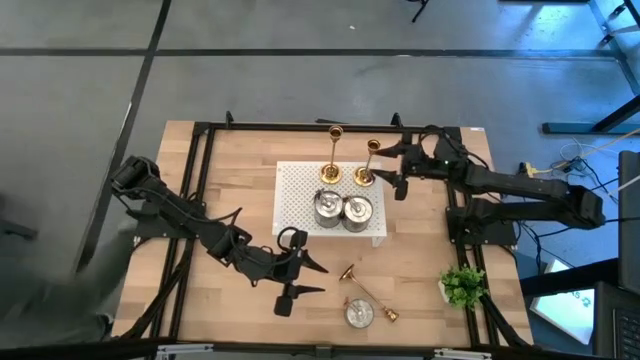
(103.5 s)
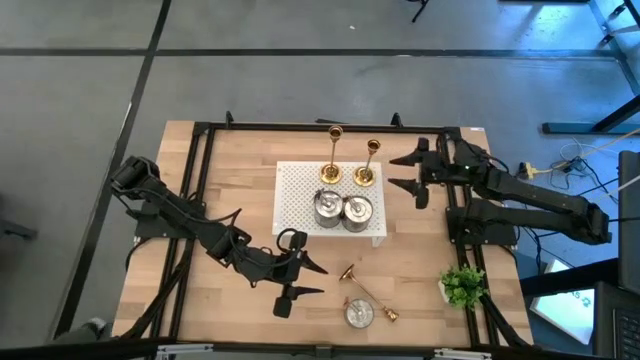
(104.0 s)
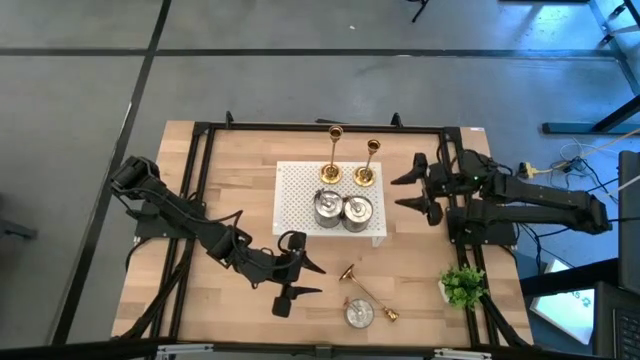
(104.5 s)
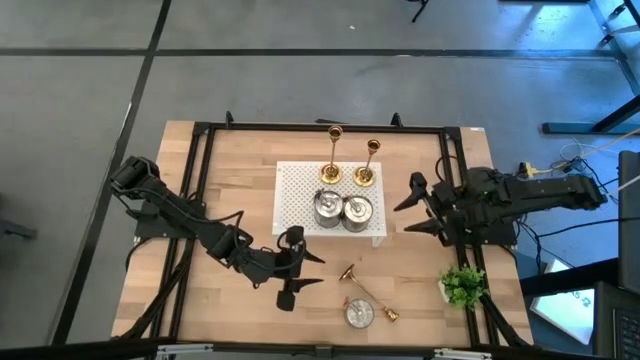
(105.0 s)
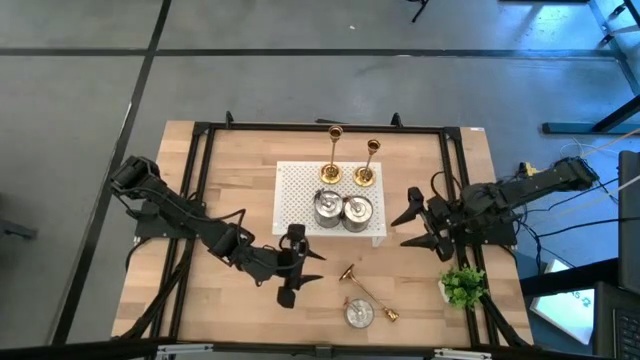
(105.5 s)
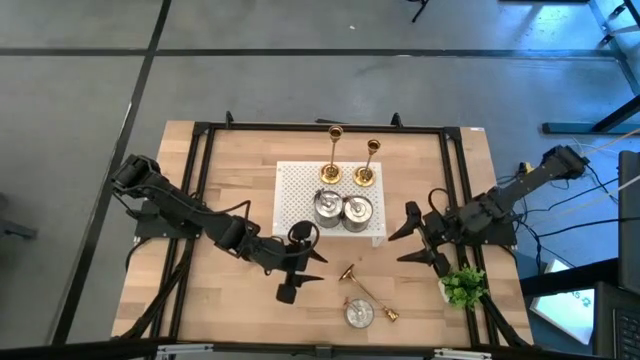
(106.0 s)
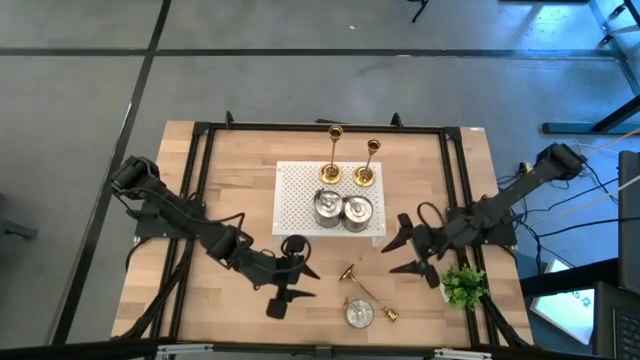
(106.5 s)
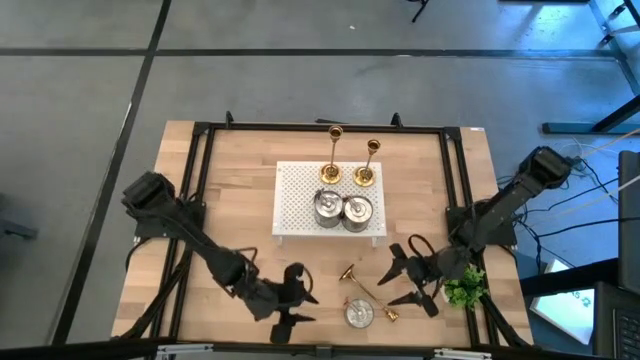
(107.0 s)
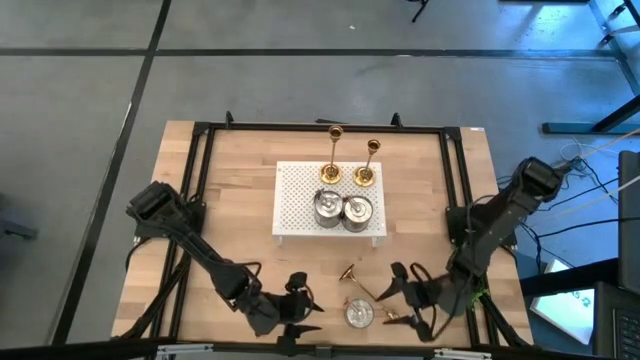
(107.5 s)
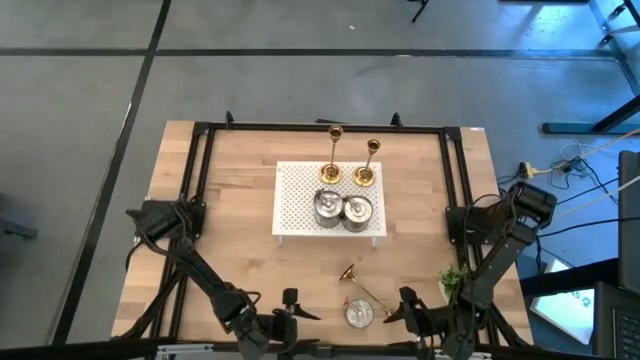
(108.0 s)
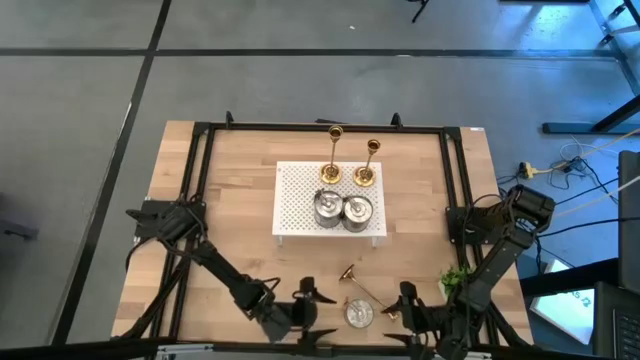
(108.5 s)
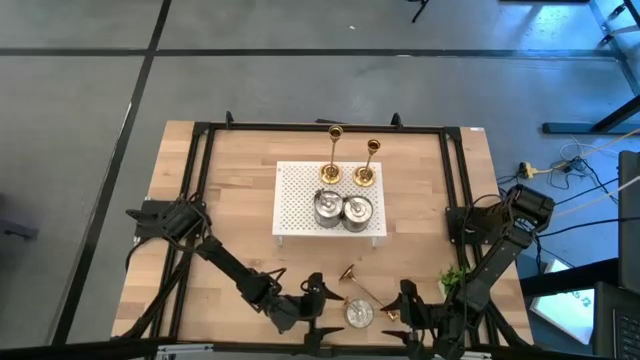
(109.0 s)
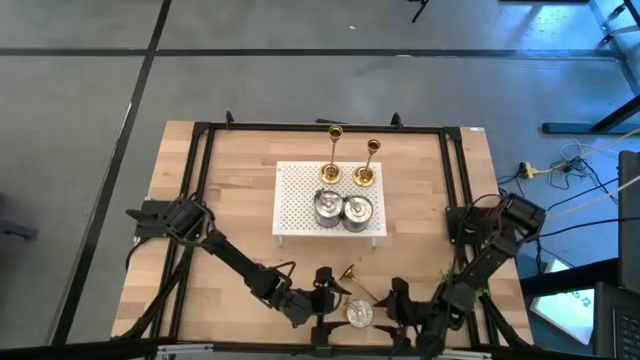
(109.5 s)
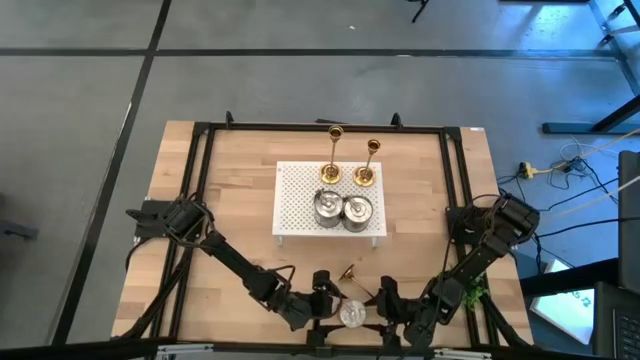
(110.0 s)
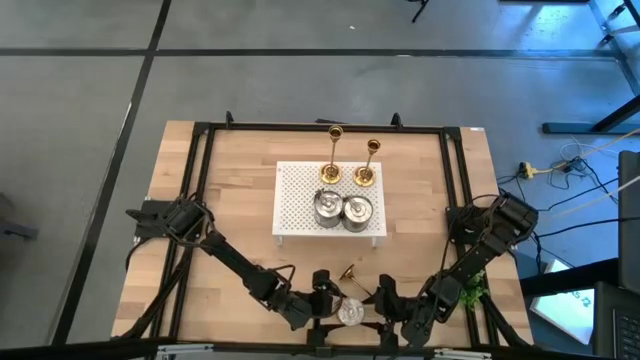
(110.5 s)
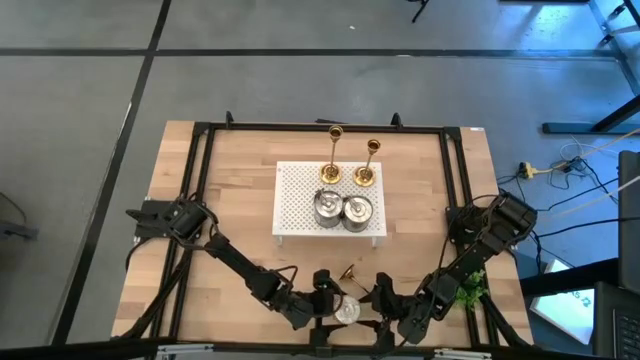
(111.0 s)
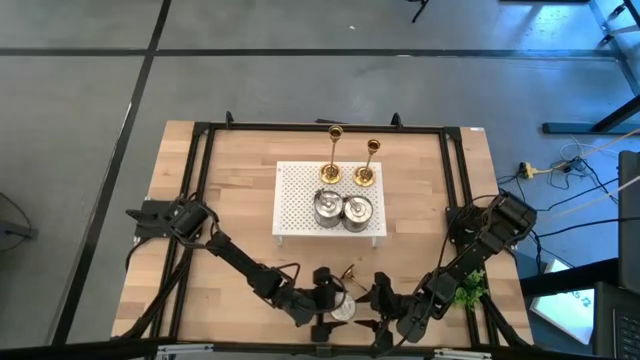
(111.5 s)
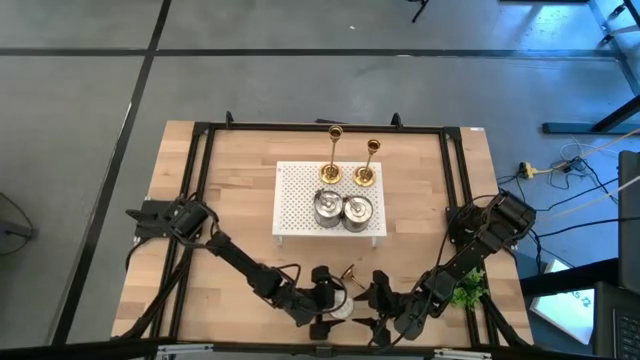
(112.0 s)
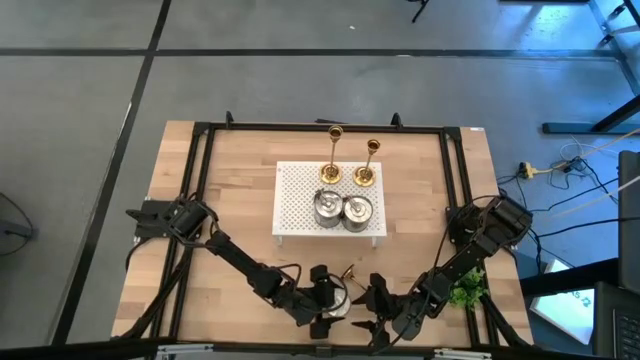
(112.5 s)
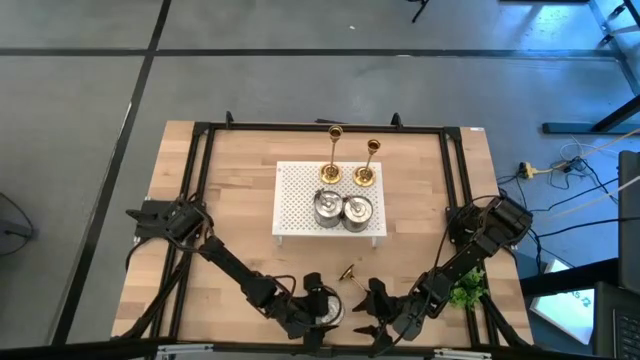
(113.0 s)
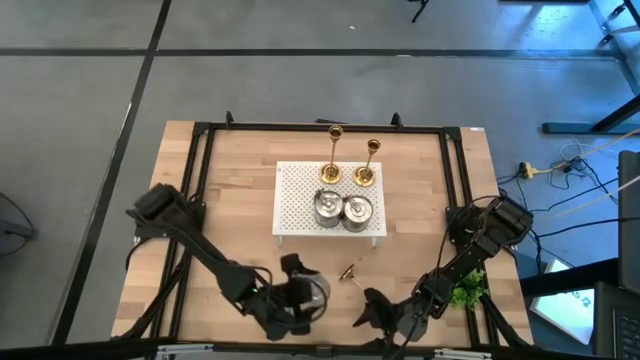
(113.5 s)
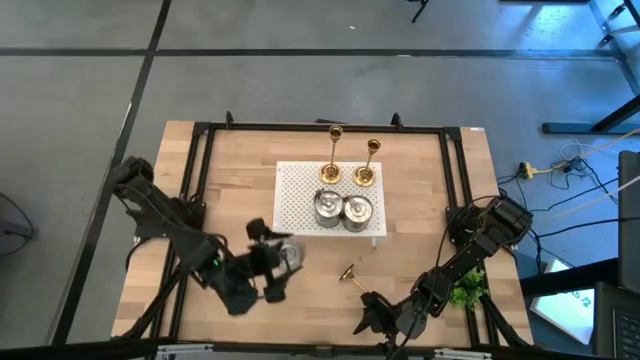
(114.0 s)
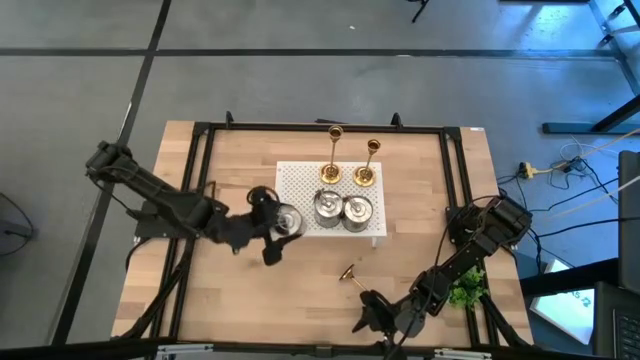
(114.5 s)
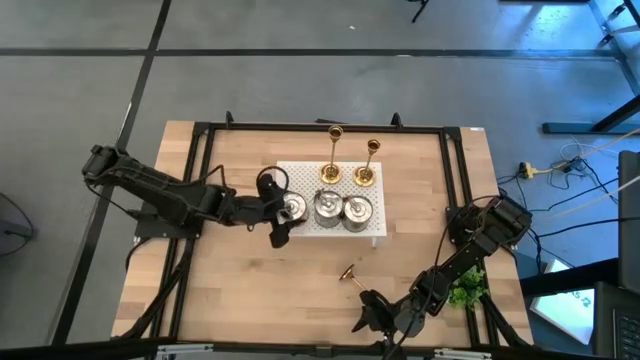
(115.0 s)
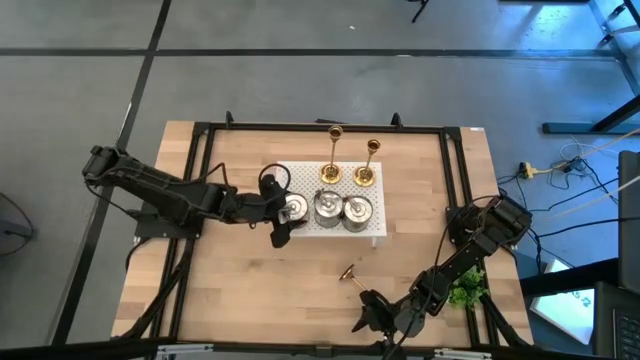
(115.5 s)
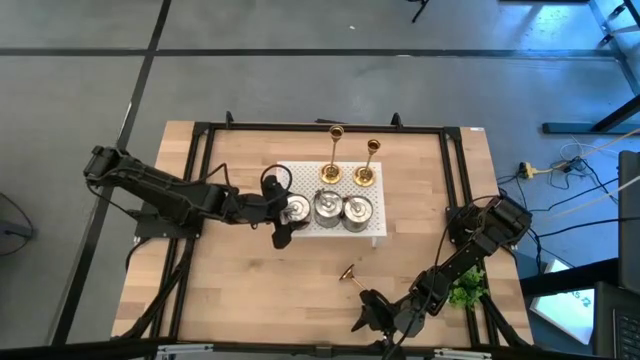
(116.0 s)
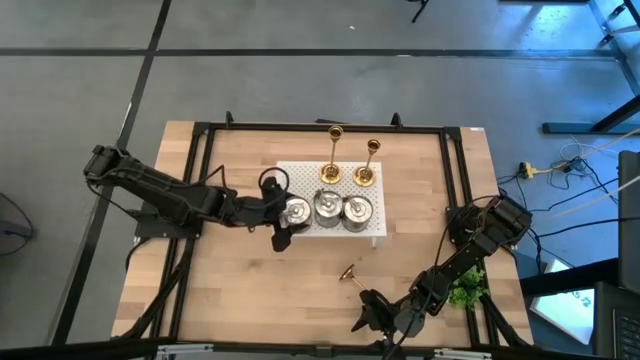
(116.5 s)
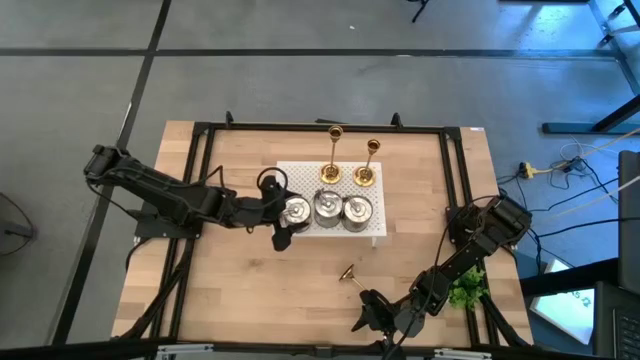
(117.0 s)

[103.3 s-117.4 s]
Task: Pick & Place candle stick holders
Put the silver scented candle on the shelf aligned with the other silver scented candles

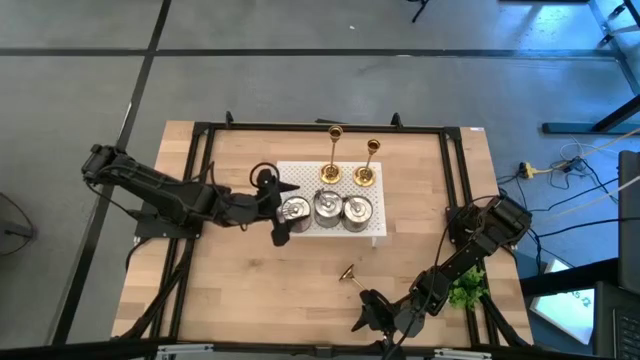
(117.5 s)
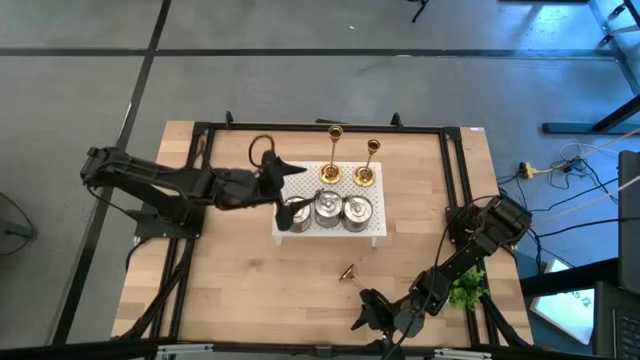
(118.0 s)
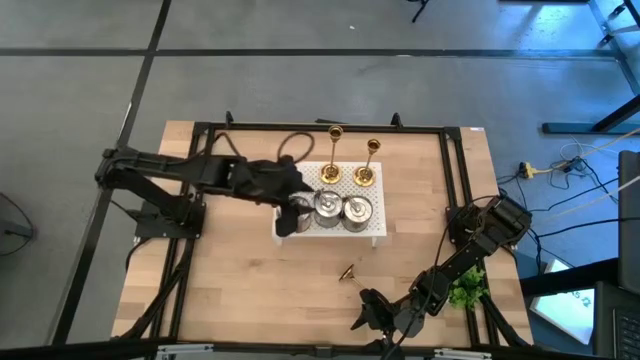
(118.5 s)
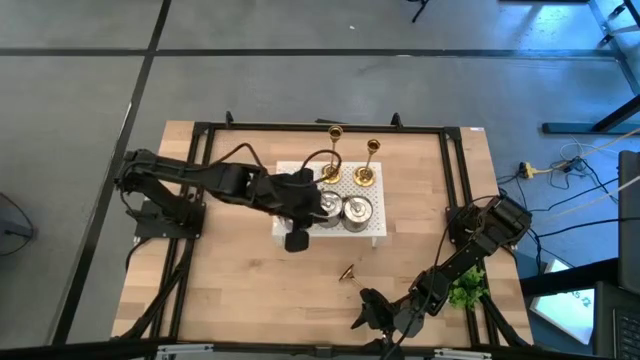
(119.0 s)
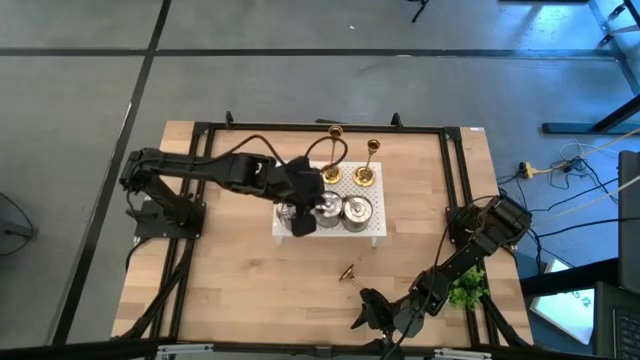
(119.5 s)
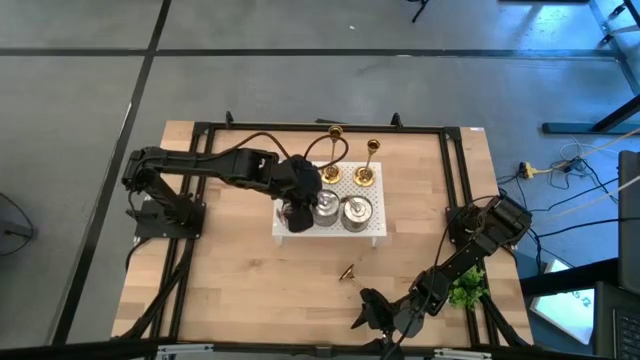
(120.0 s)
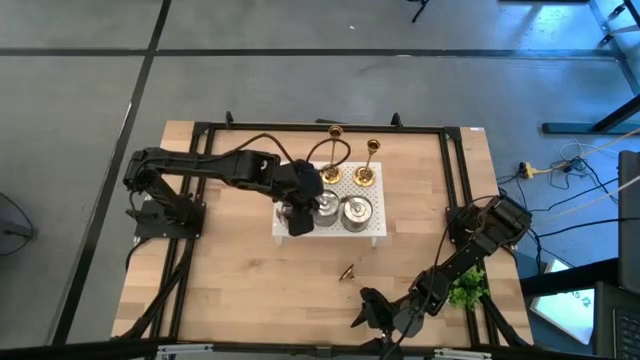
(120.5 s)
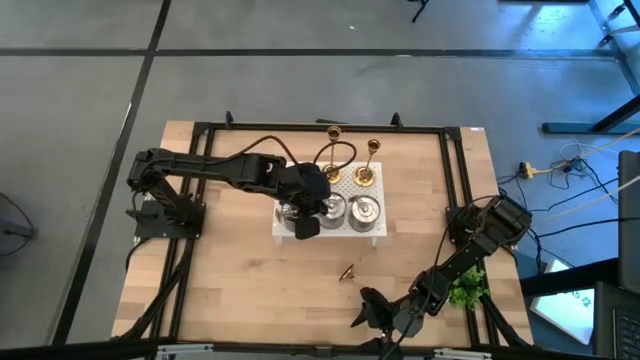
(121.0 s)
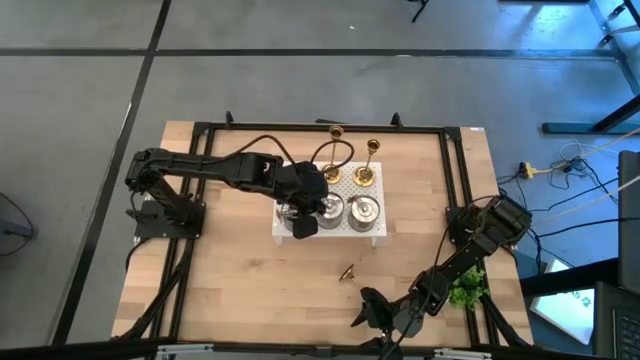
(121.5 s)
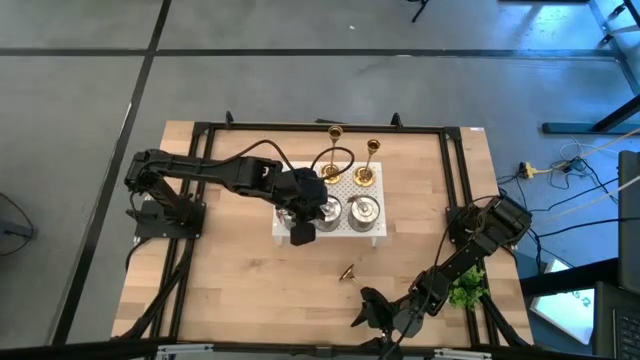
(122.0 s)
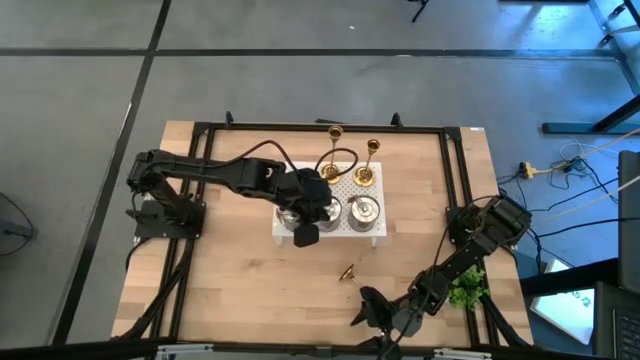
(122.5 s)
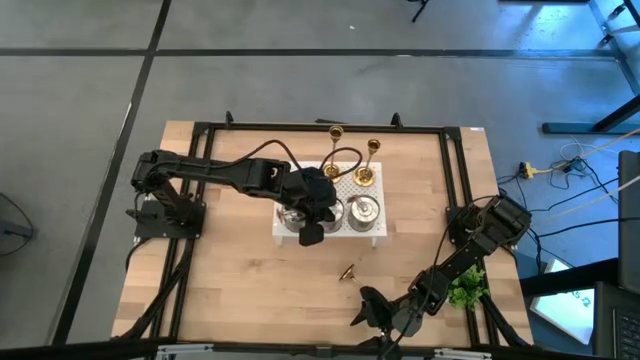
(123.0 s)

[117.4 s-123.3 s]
Adjust the silver scented candle on the shelf

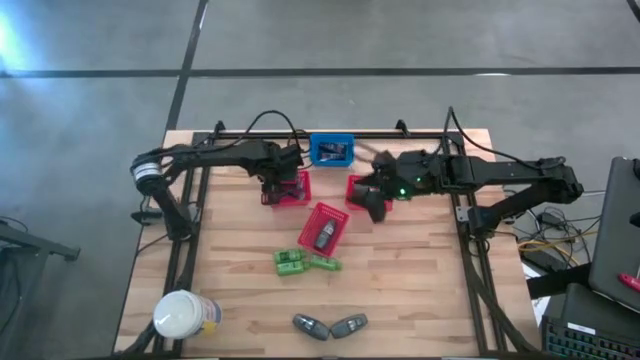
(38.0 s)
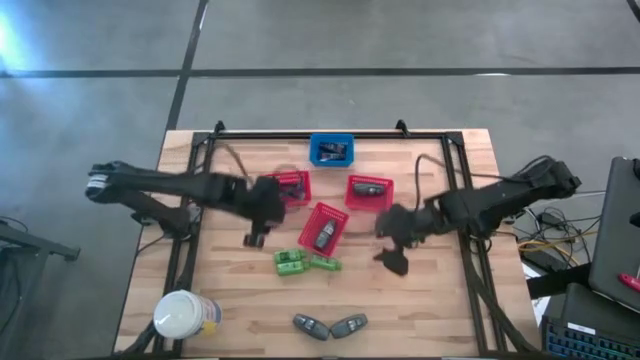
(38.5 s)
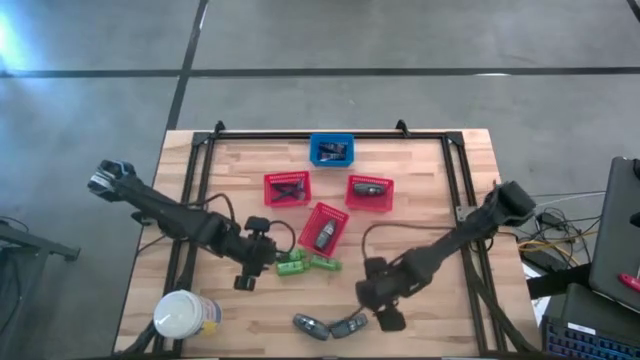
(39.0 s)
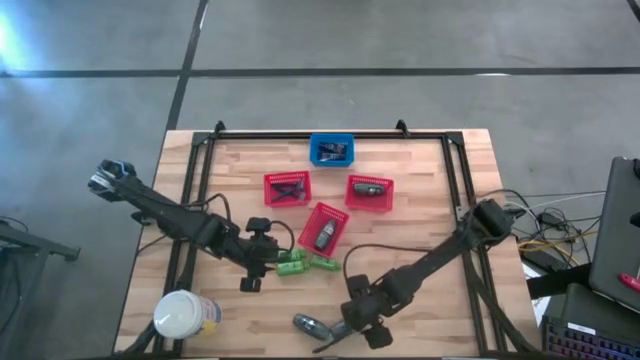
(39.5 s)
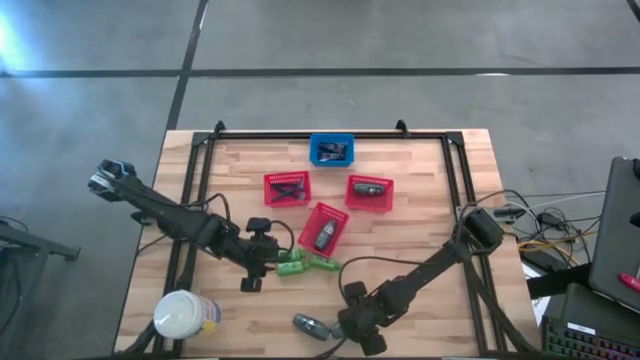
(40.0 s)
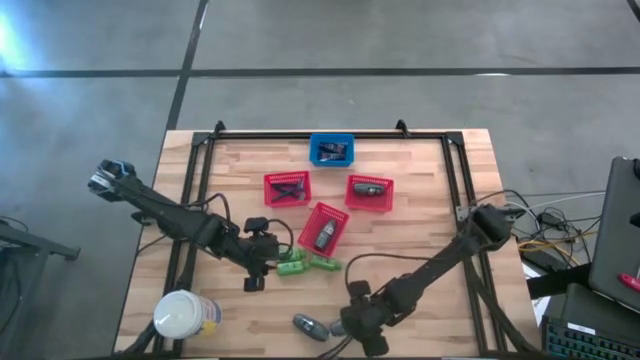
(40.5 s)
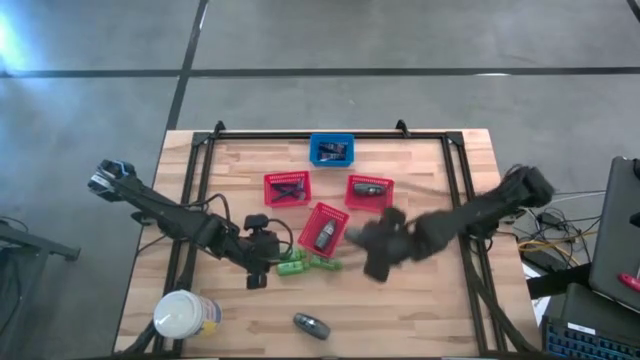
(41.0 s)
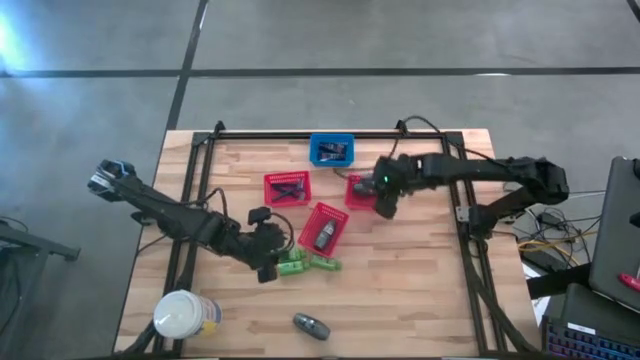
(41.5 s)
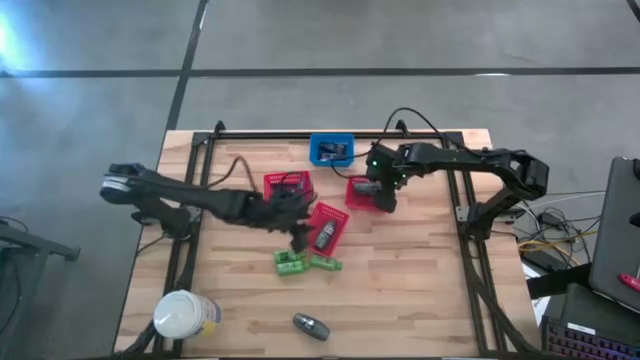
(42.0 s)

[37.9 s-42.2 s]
Task: Pick & Place Travel size toiletries
Put the black deodorant into the top right red bin
